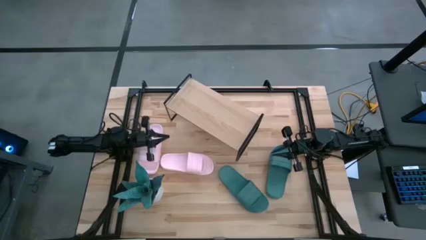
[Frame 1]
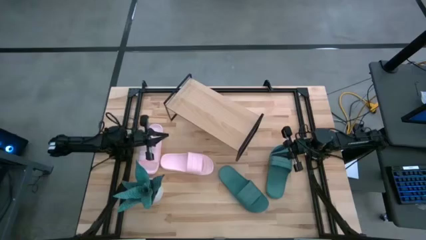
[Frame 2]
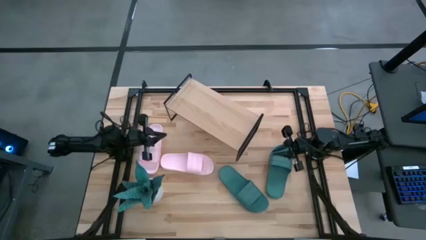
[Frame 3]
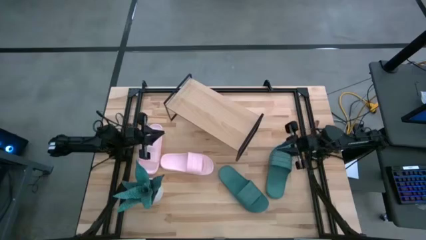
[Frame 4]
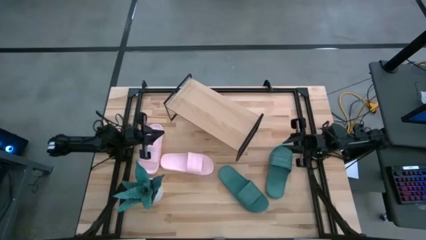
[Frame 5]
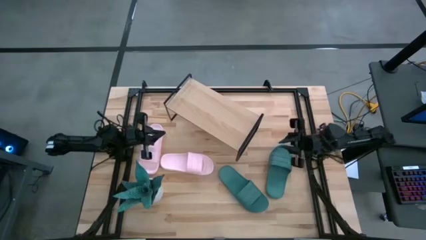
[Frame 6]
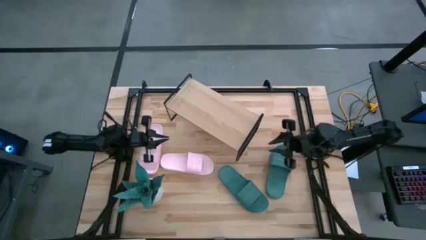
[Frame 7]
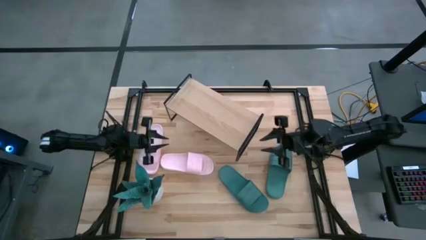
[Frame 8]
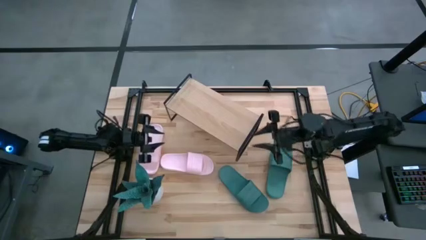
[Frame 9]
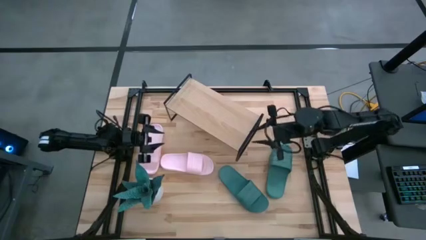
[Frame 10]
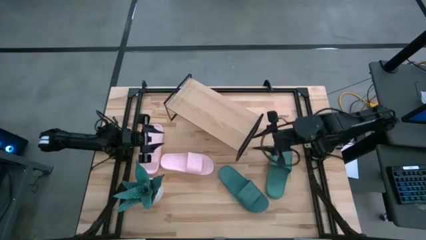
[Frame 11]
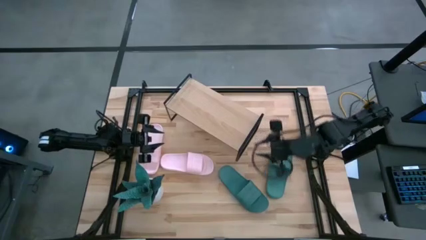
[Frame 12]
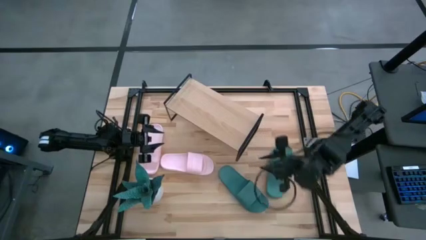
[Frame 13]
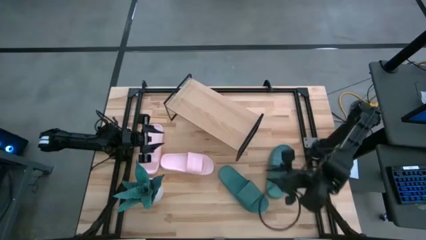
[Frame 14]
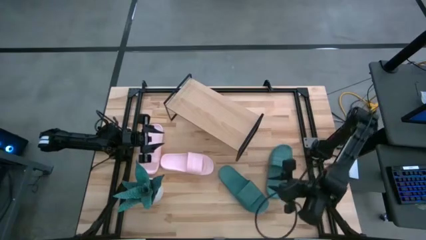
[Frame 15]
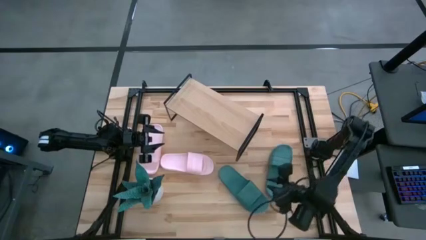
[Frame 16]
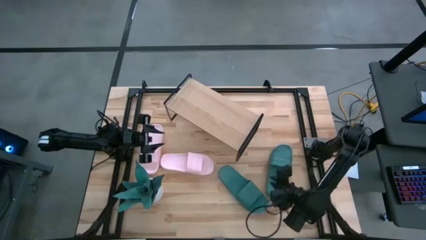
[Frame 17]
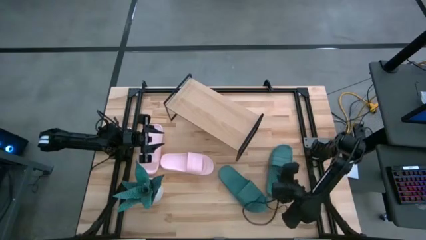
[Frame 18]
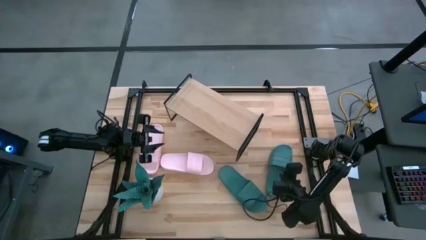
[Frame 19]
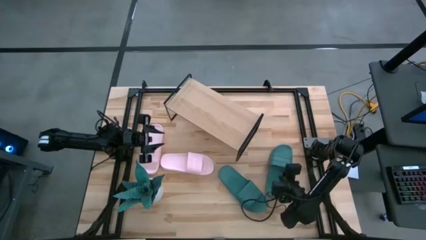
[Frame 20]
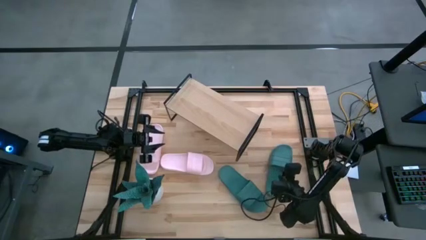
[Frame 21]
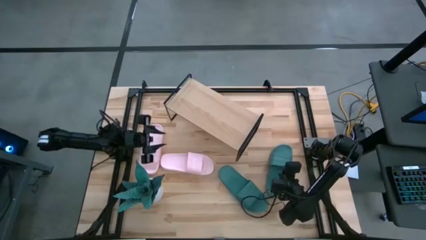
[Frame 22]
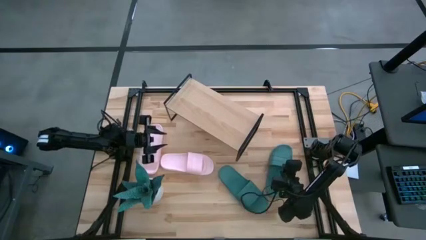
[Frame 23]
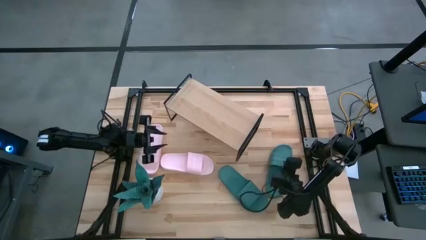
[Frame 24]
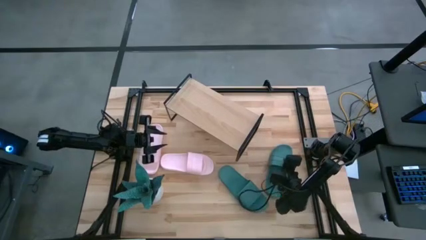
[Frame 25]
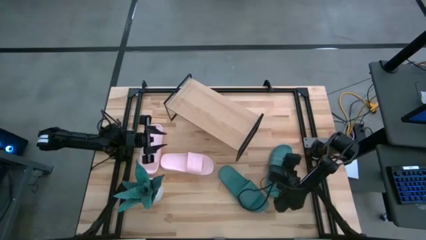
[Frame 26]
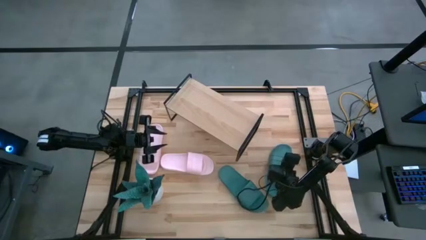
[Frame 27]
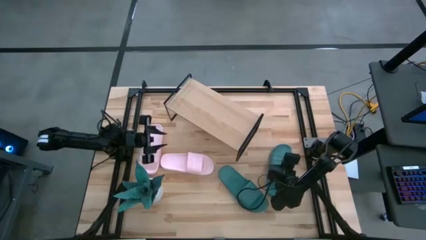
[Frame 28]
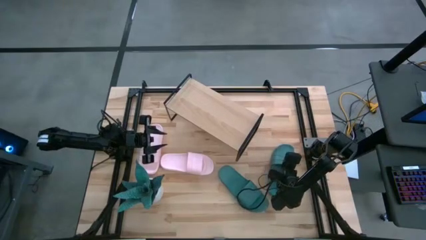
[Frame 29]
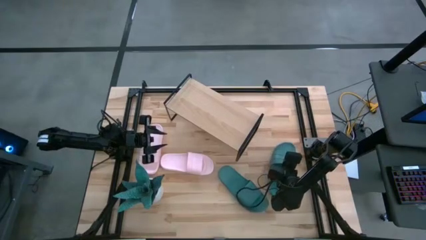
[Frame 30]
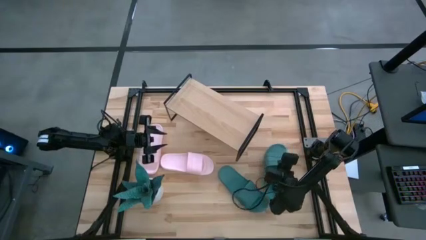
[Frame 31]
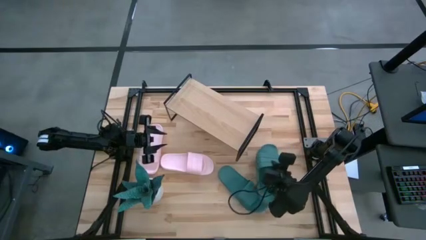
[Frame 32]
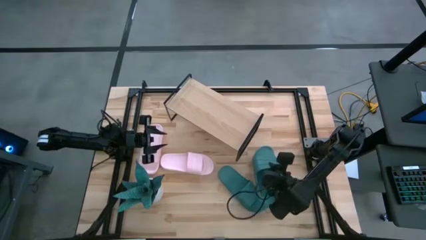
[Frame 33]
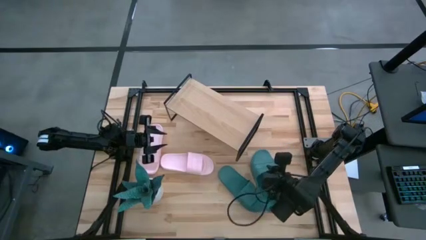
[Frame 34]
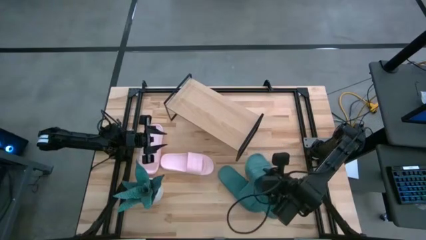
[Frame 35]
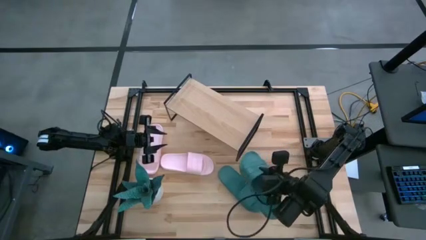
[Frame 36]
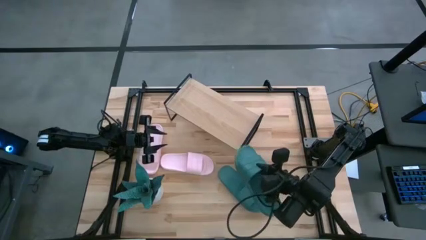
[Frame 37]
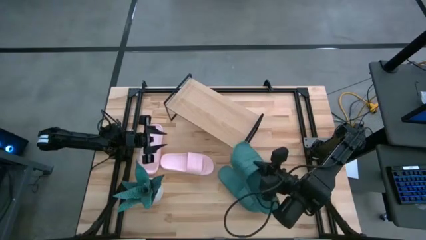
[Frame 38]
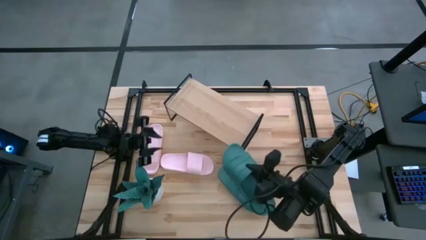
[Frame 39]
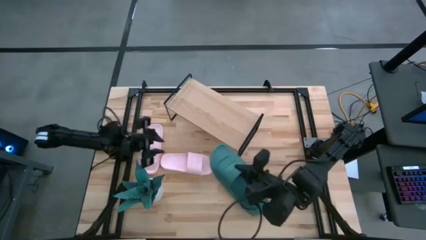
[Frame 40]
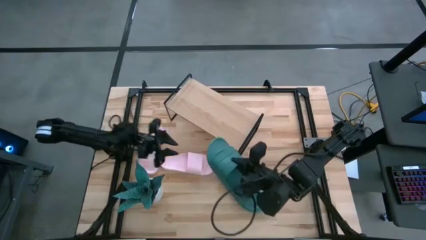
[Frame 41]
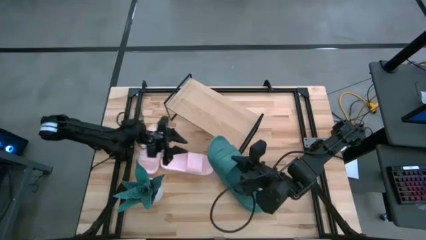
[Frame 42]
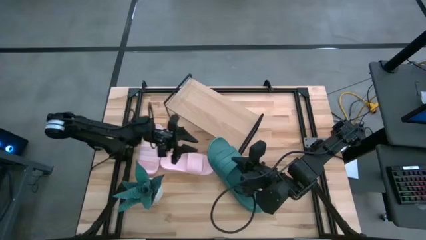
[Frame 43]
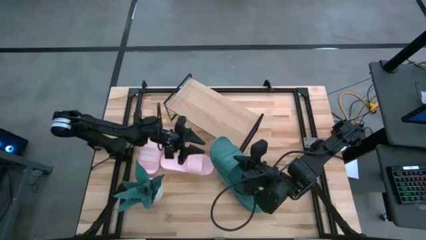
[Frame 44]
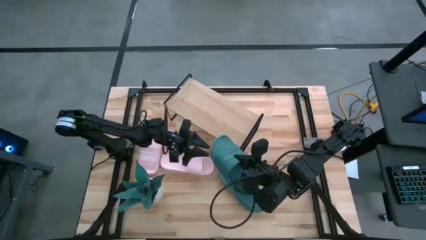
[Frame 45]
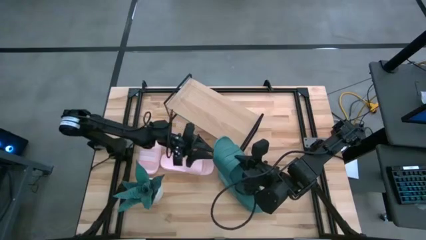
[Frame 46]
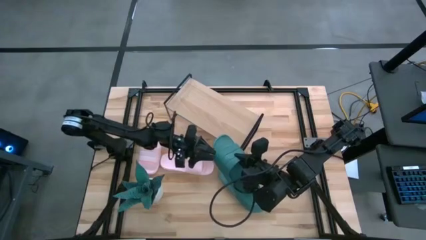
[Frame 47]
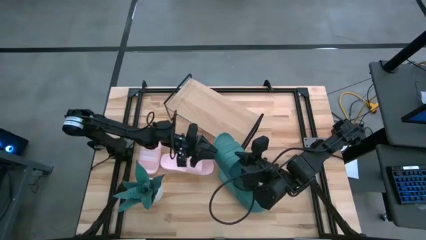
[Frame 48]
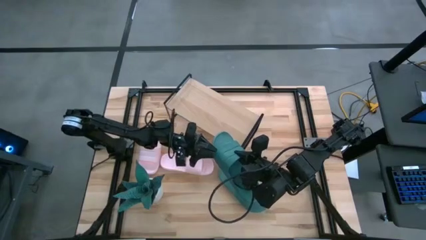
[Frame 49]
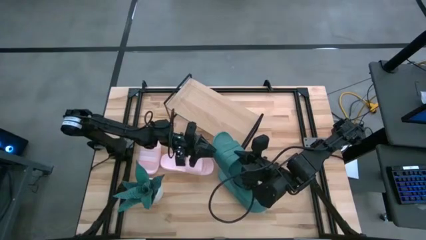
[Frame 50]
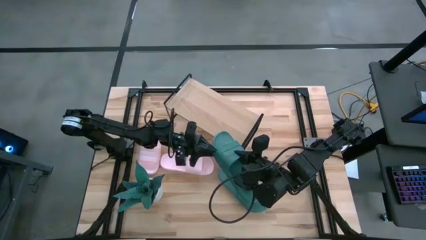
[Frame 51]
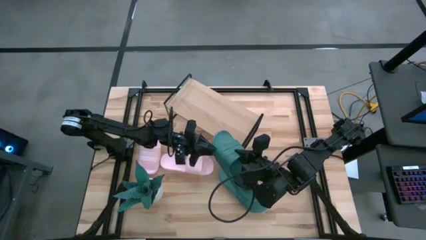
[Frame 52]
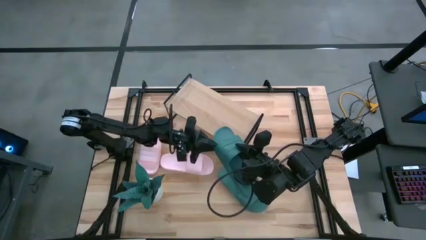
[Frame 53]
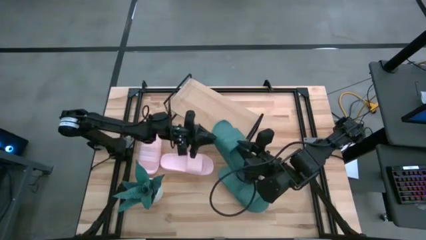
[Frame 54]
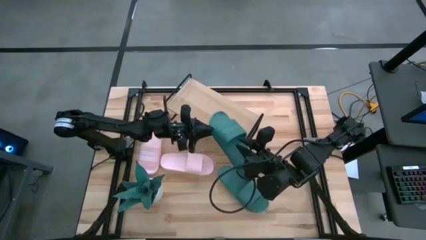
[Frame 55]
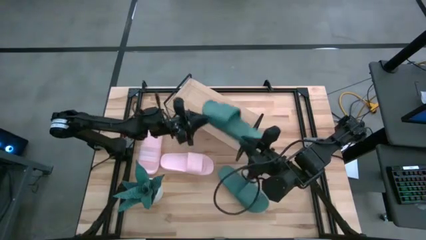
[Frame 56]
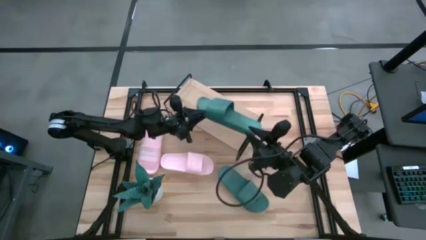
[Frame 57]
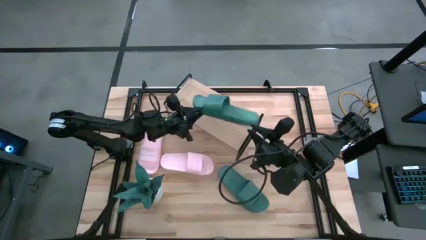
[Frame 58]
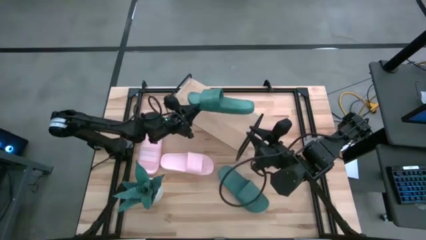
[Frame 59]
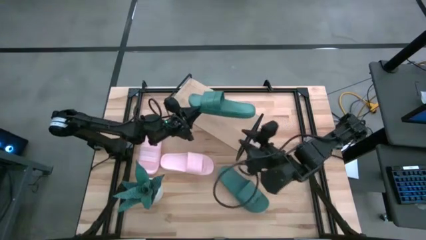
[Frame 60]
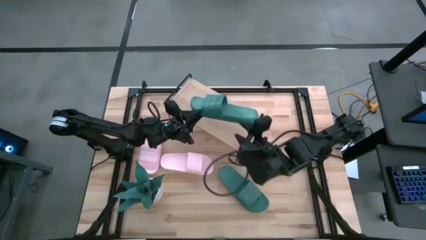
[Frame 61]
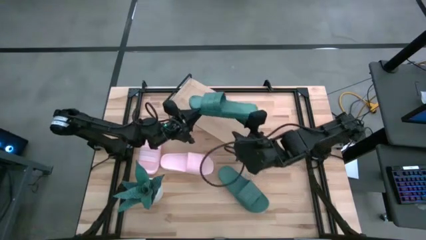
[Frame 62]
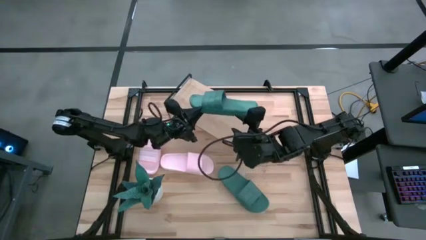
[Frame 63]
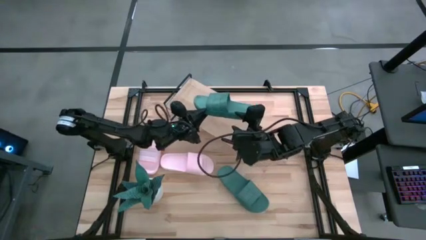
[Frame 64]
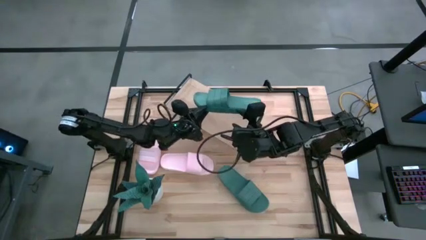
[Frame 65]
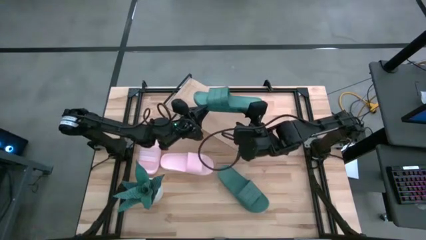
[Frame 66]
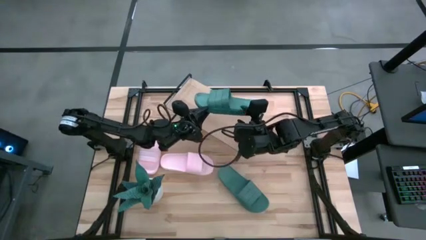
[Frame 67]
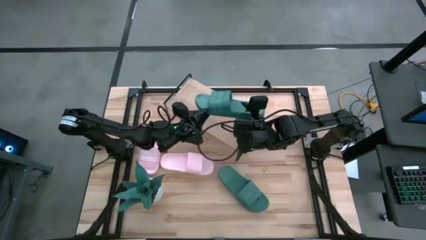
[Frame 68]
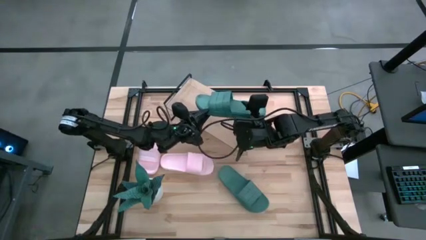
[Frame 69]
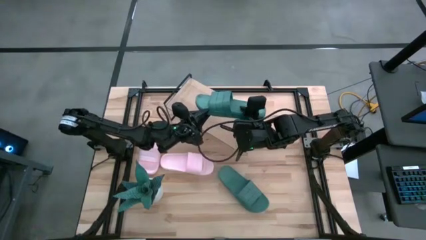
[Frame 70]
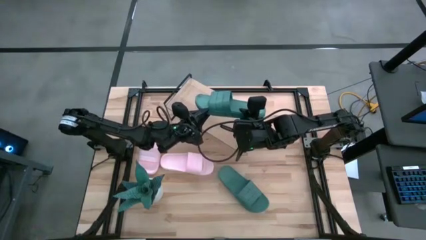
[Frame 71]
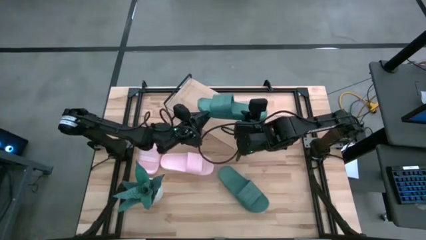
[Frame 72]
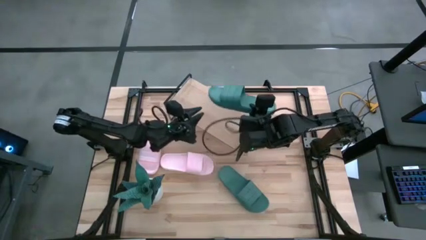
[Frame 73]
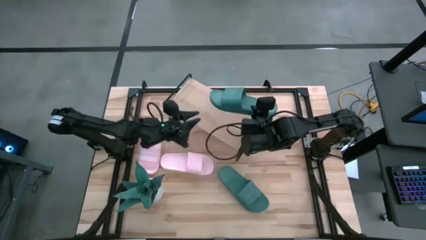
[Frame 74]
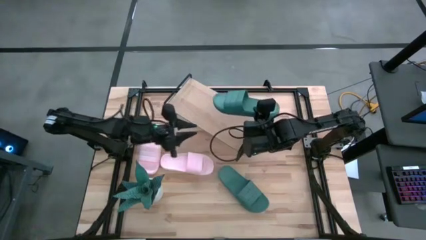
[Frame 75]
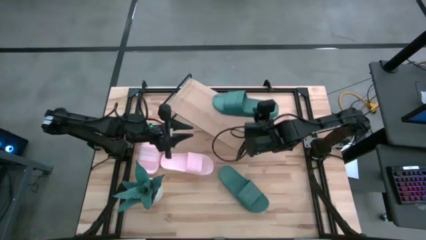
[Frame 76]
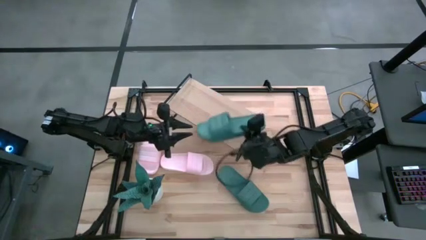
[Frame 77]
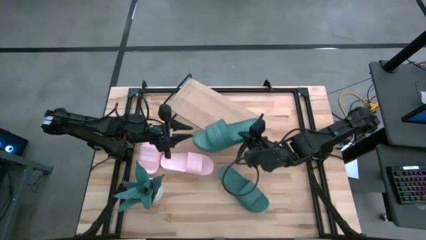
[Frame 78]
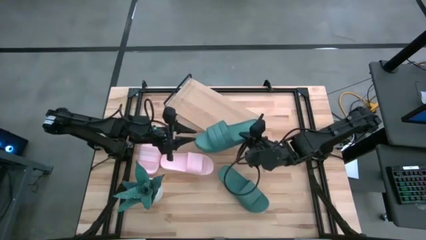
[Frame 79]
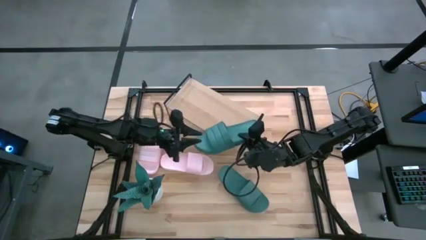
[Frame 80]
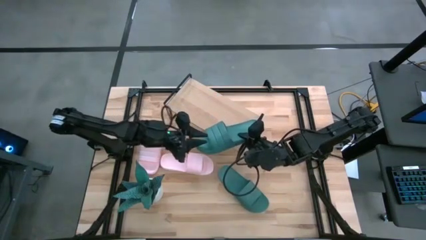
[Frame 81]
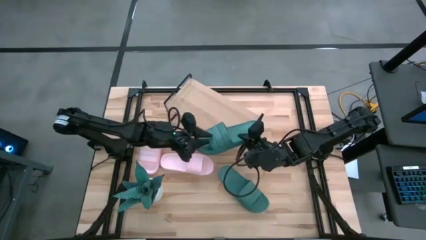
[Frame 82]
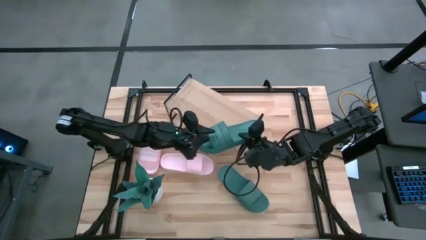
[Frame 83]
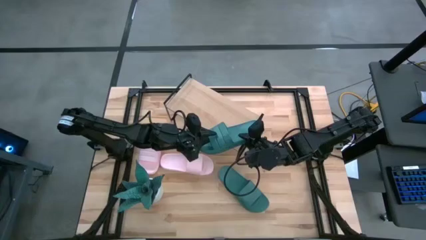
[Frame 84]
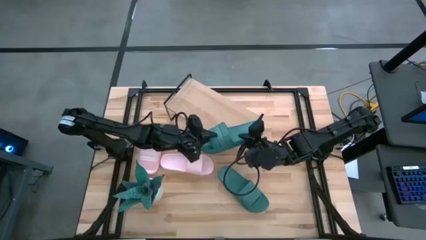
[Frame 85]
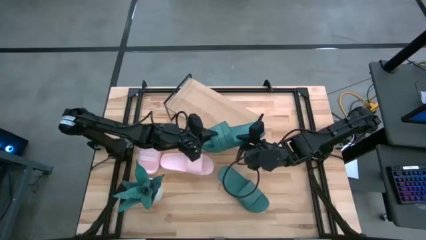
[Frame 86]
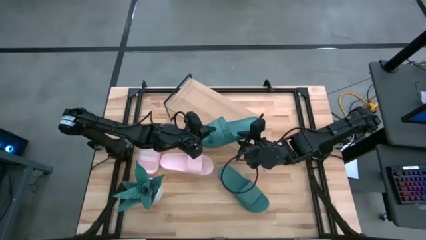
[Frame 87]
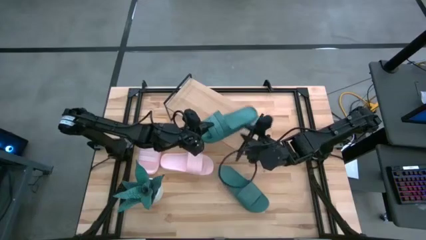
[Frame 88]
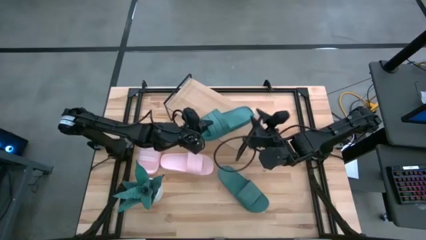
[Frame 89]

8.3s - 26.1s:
Task: Pick and place slides into the shelf
Put the right green slide on the shelf
